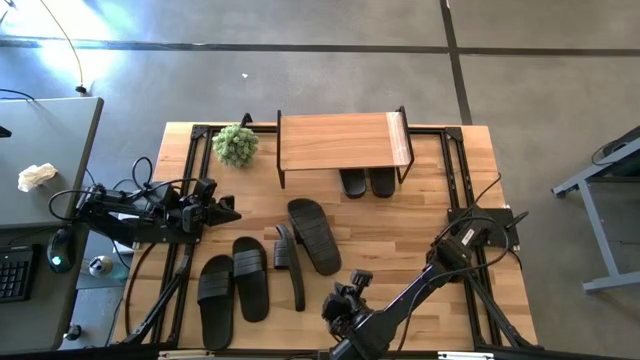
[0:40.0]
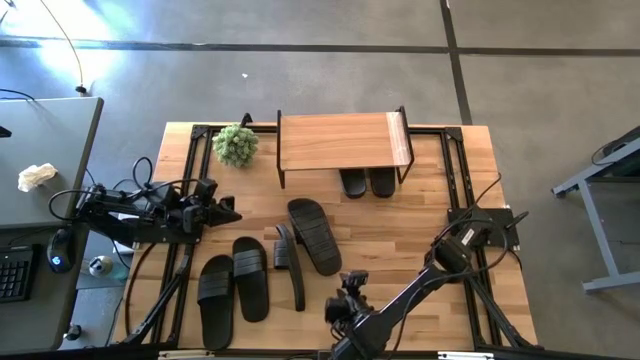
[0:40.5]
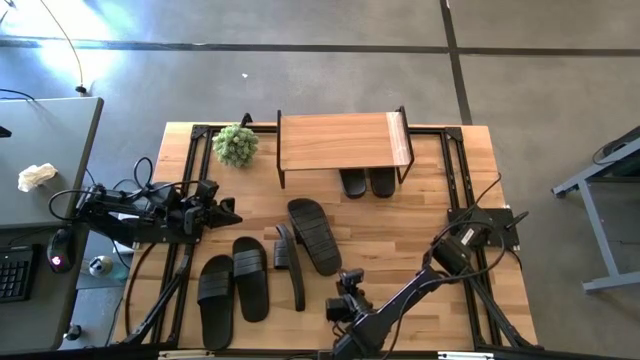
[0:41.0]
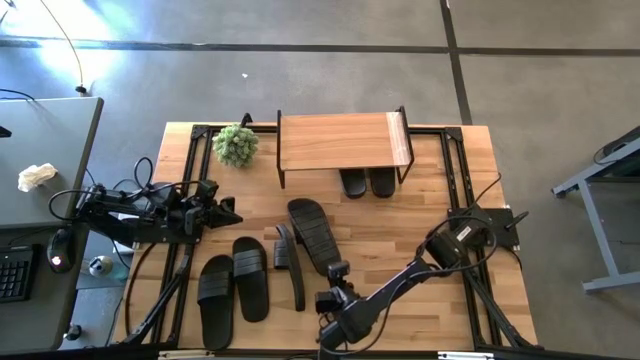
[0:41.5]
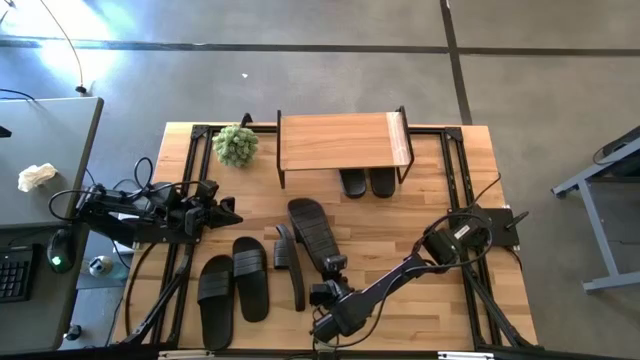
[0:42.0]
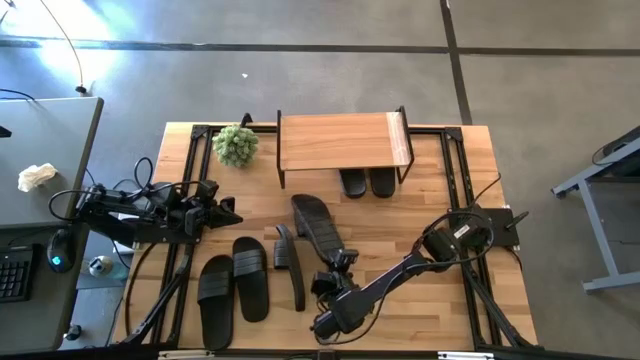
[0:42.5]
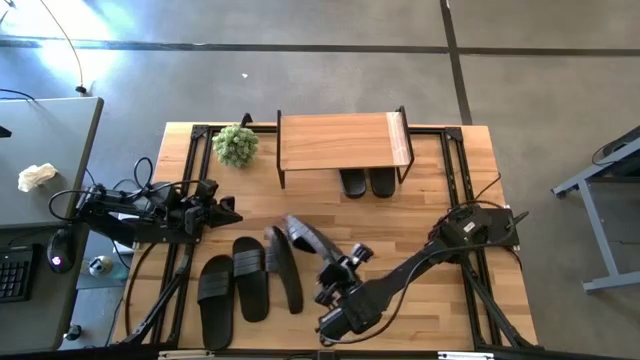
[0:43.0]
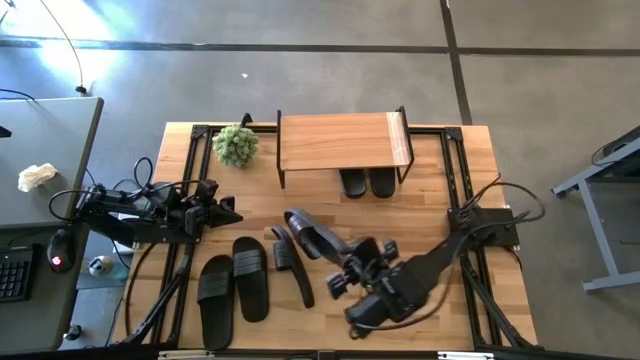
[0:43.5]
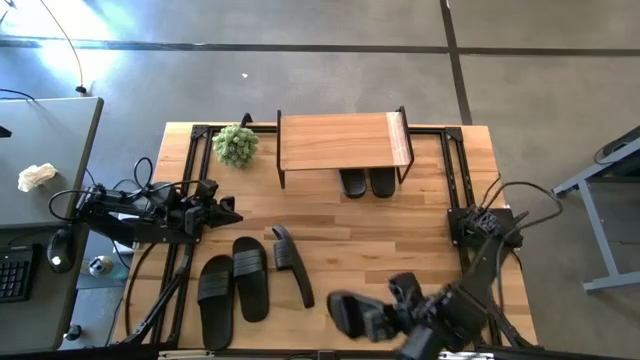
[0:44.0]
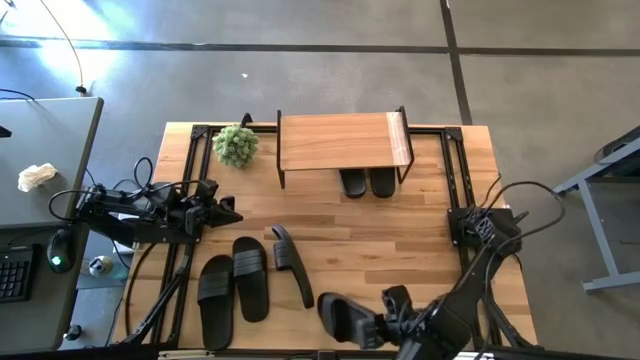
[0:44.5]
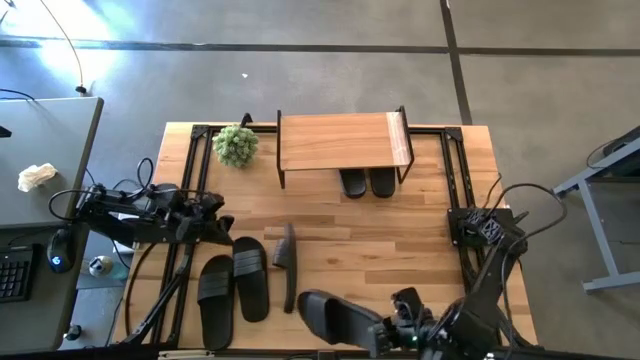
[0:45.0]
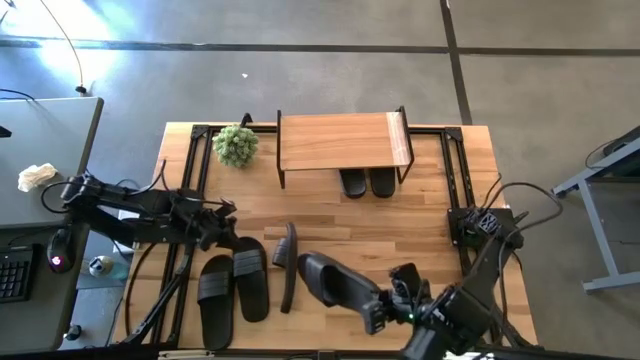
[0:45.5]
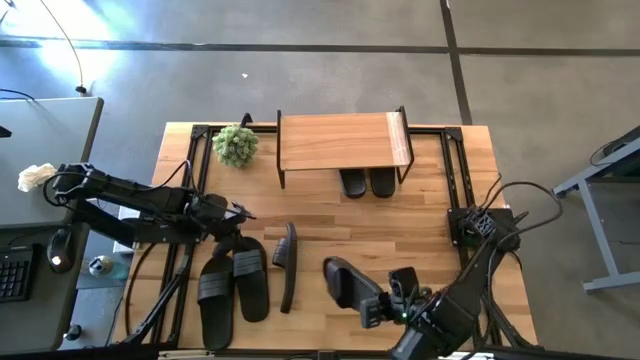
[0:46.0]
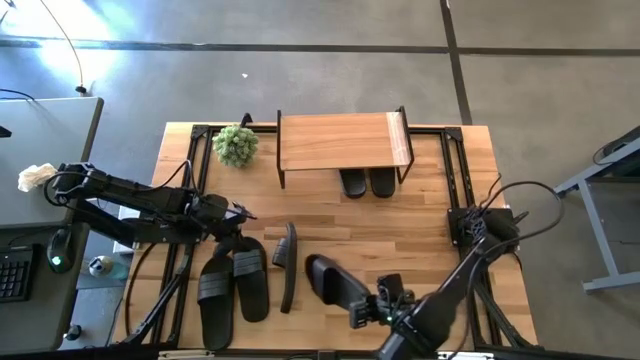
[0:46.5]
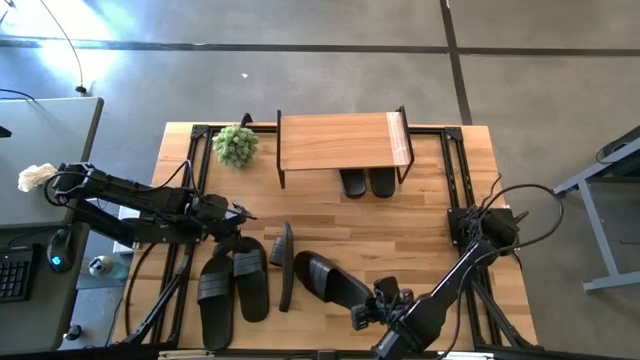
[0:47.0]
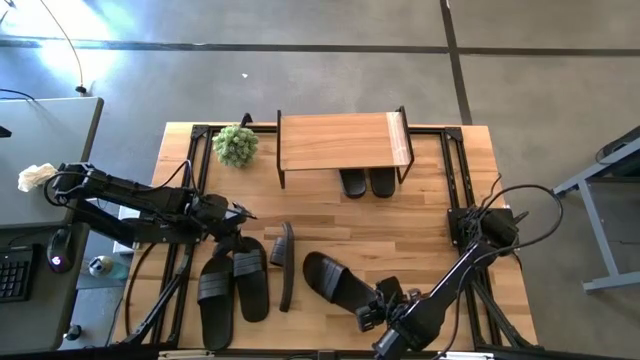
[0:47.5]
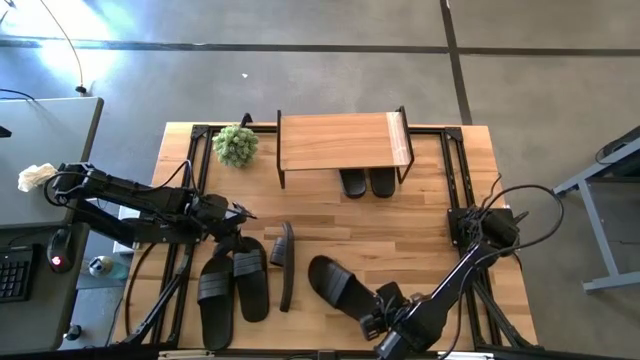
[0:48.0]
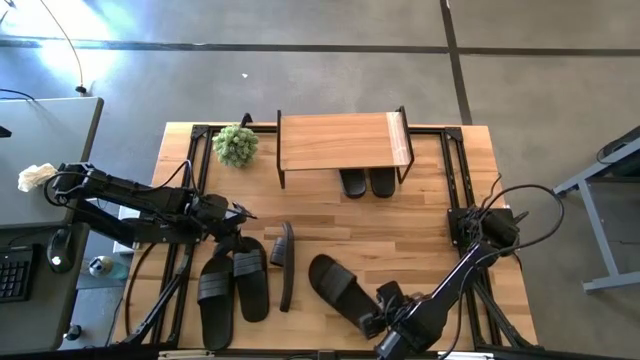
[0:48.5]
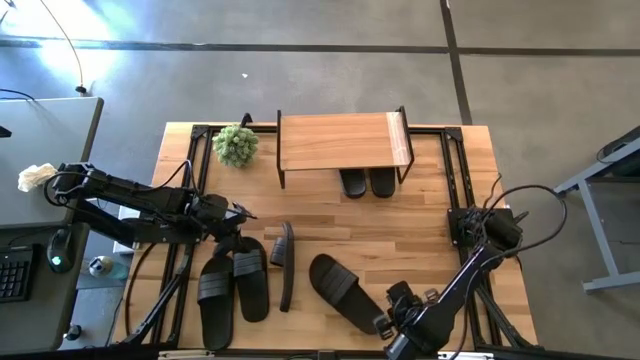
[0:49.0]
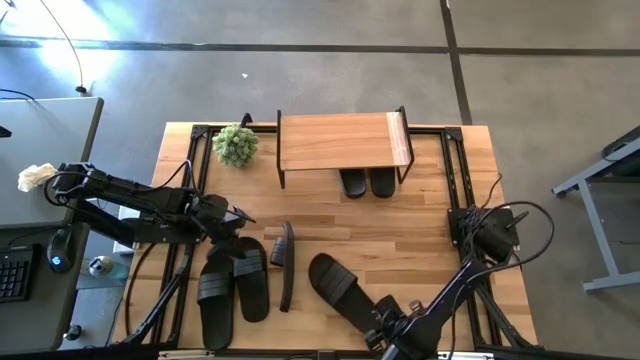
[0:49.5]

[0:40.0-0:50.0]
Task: Pick and place slides into the shelf
Adjust the black slipper

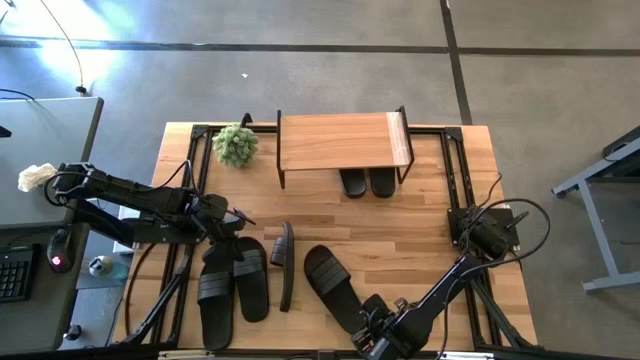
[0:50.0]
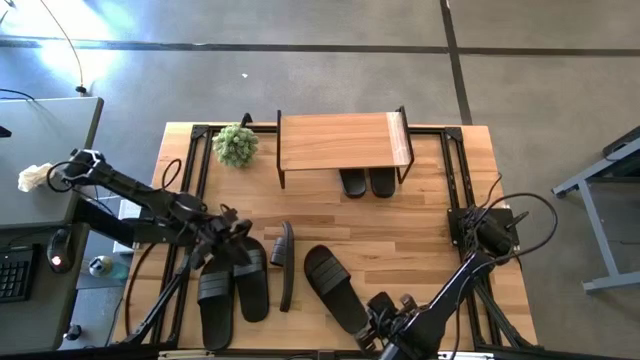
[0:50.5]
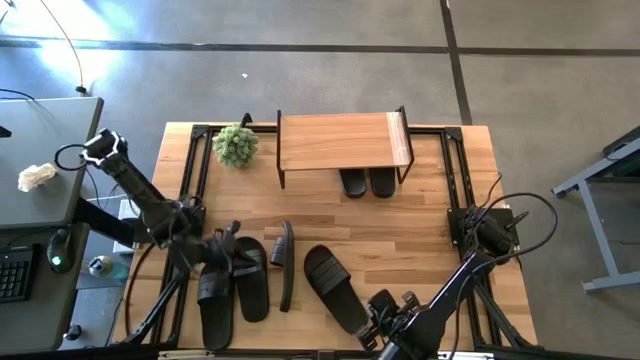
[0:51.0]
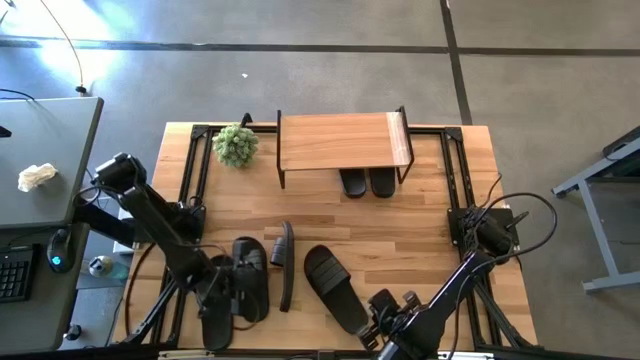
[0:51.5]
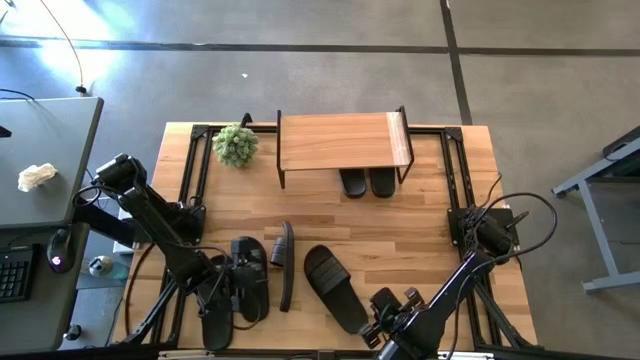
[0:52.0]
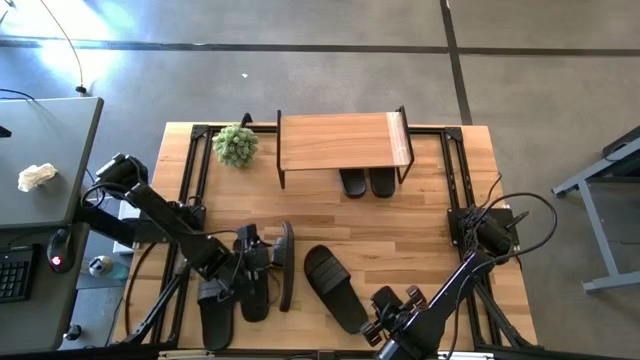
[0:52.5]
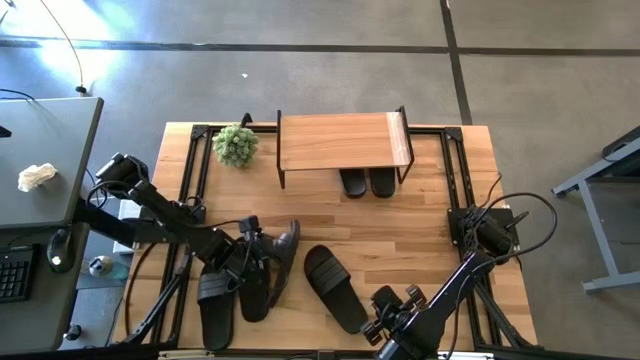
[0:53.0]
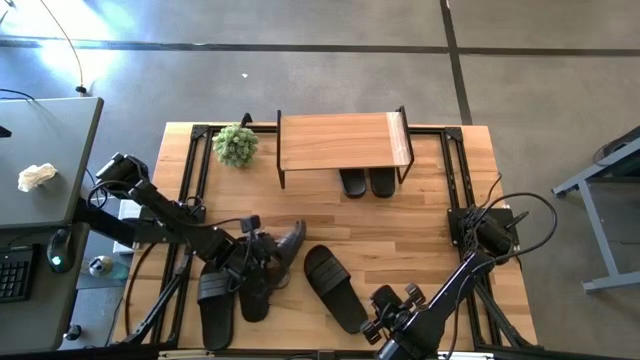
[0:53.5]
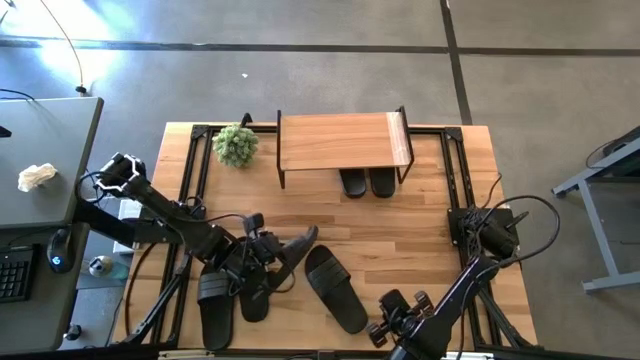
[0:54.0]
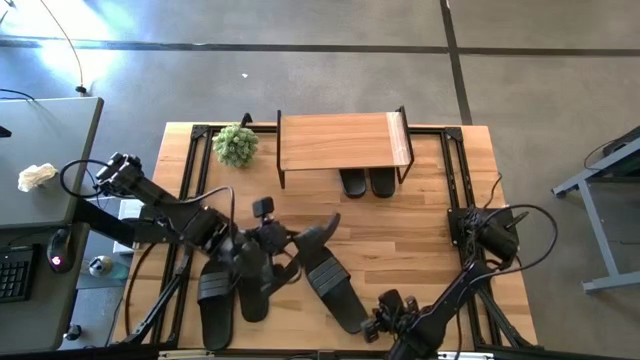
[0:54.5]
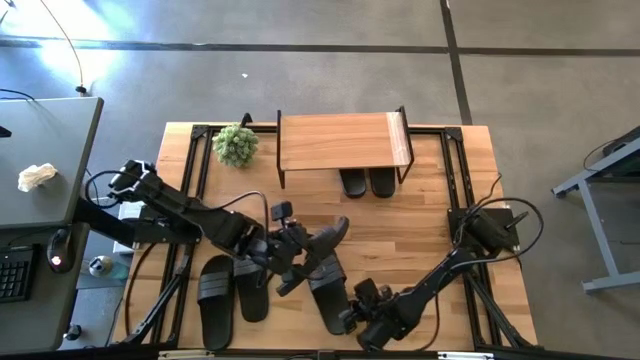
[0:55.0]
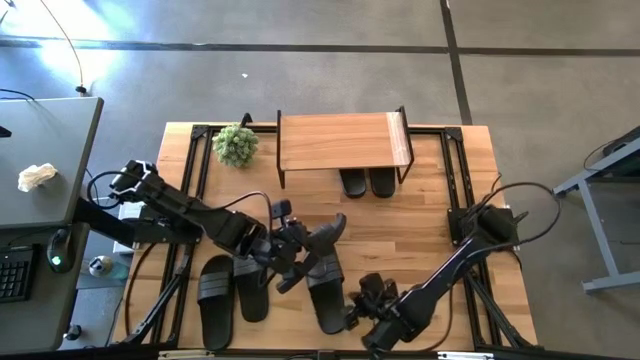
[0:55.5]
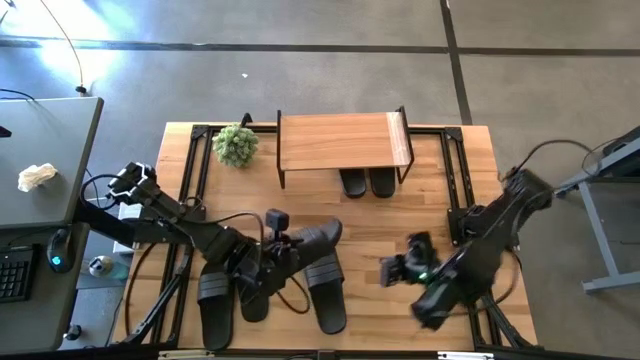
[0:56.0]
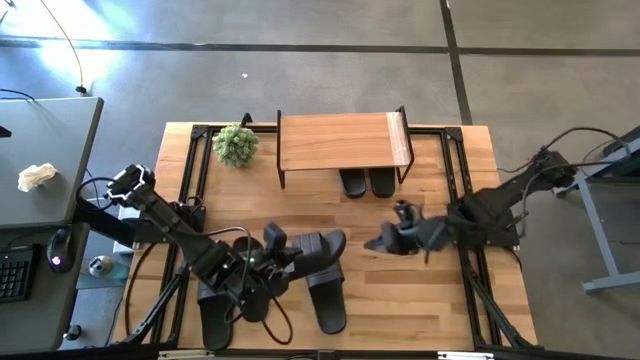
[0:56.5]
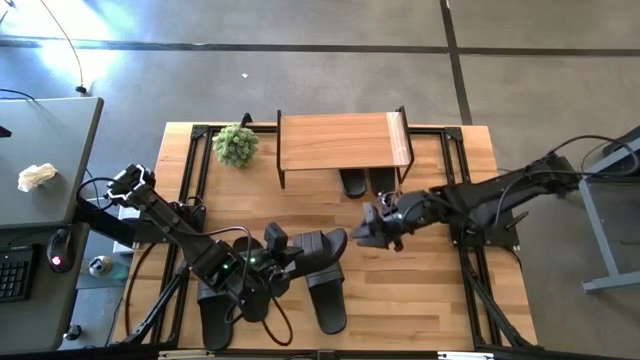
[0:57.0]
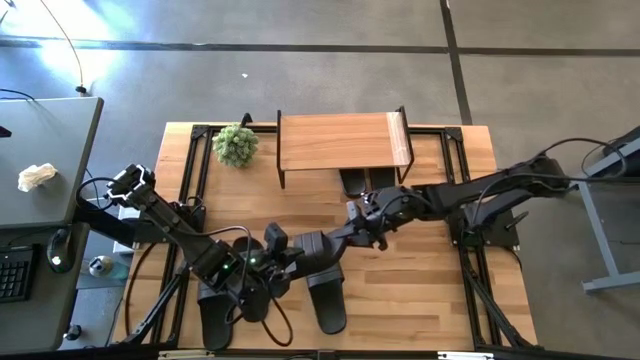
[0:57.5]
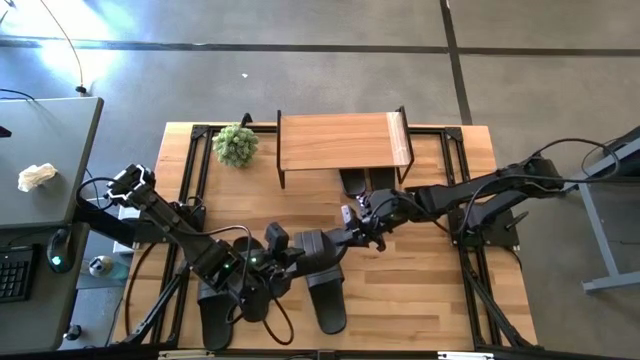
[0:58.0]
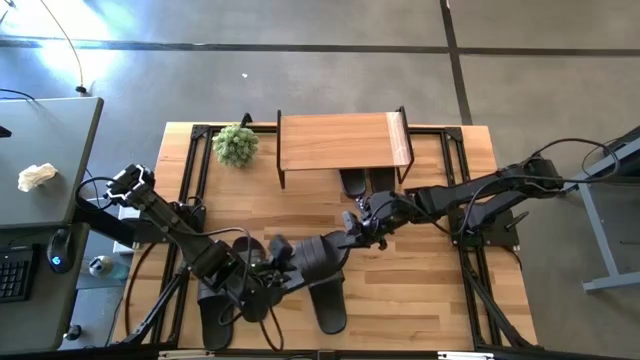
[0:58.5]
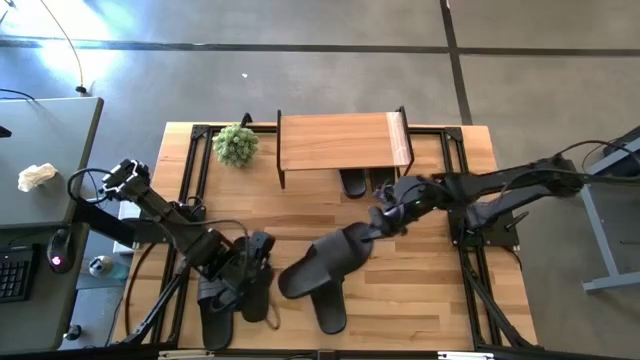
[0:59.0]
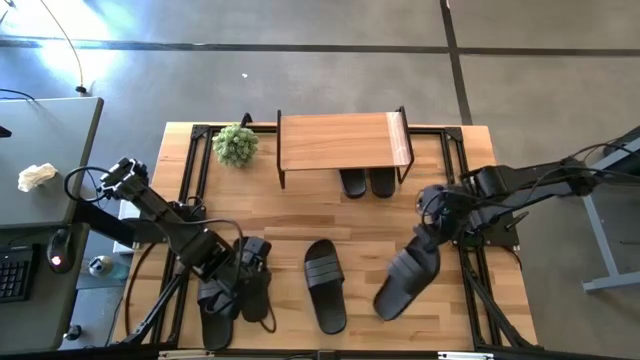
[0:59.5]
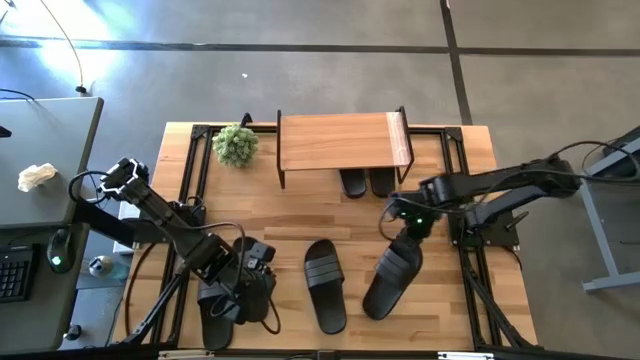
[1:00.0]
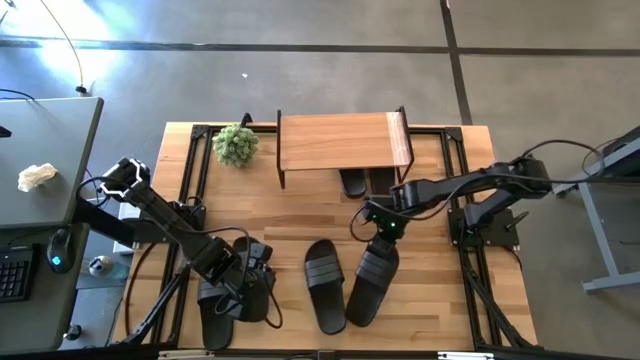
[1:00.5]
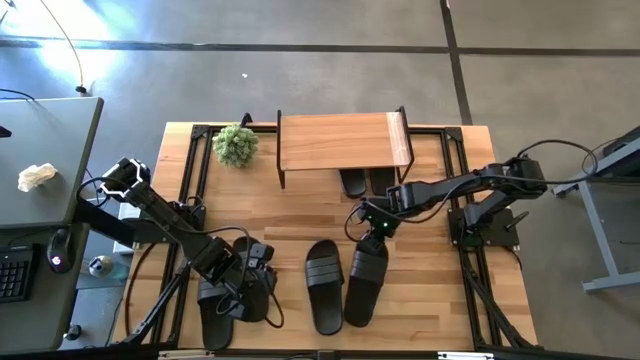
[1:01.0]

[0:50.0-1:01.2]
Move the middle right black slipper to the right side of the right black slipper

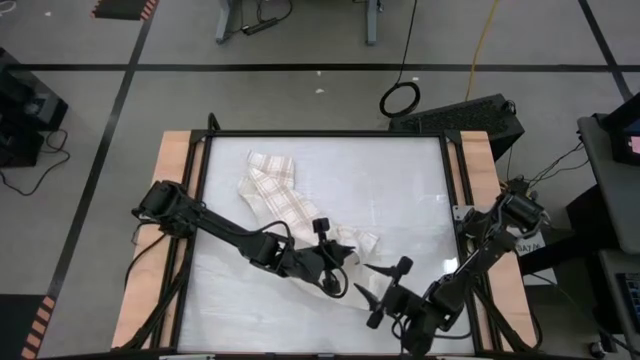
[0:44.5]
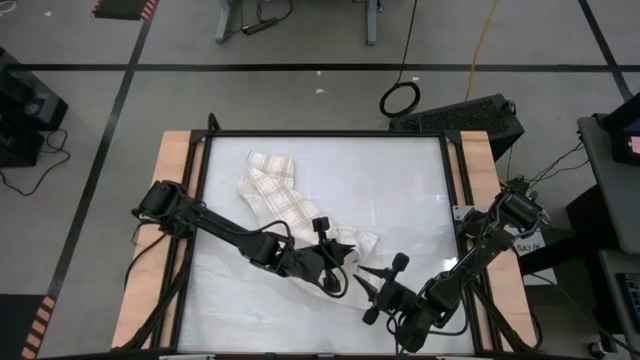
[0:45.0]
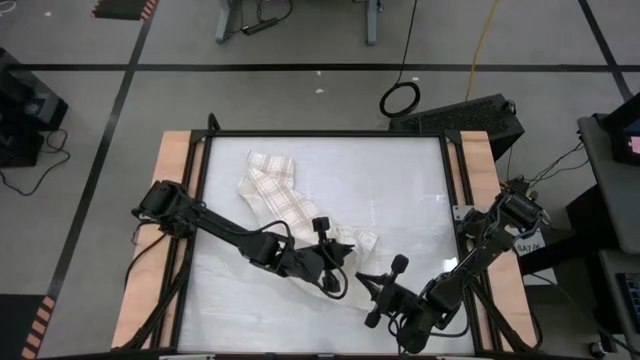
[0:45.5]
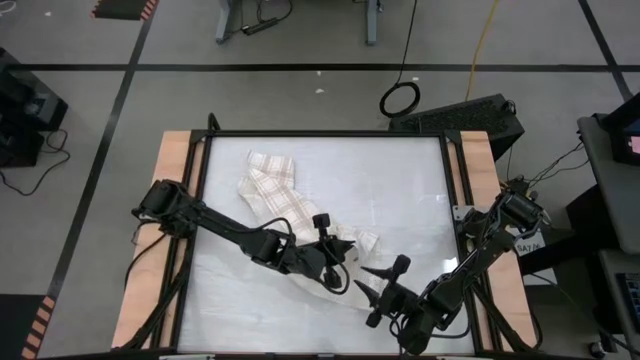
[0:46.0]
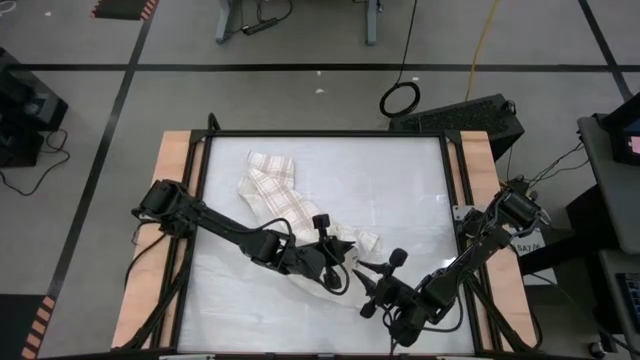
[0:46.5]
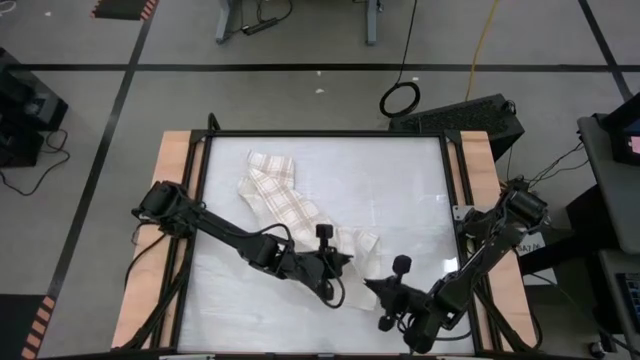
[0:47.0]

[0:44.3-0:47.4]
Task: Roll towel
Roll the white-brown patterned towel
